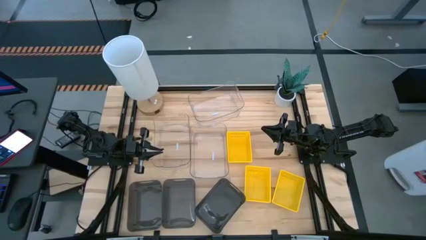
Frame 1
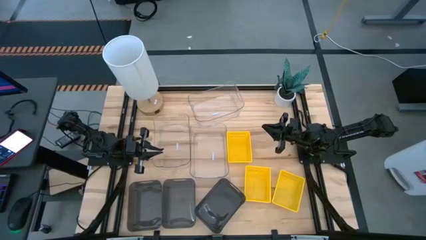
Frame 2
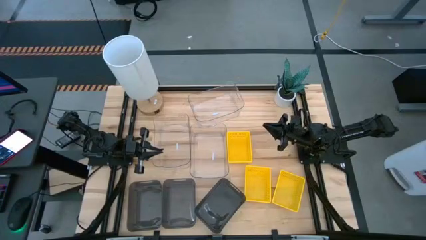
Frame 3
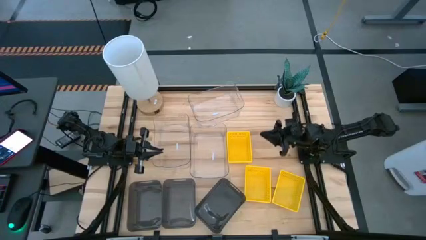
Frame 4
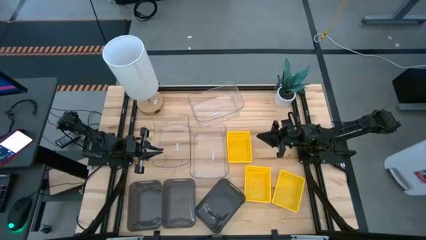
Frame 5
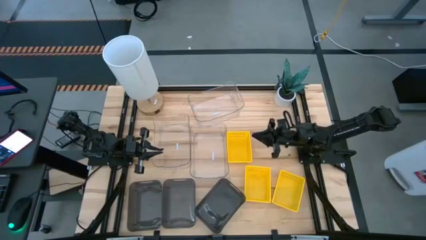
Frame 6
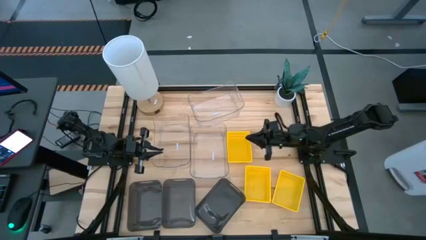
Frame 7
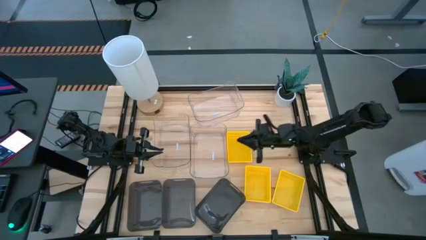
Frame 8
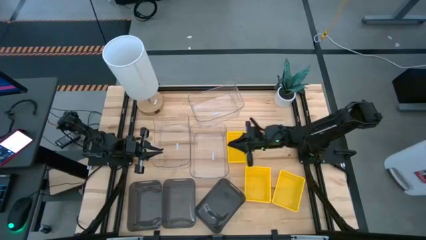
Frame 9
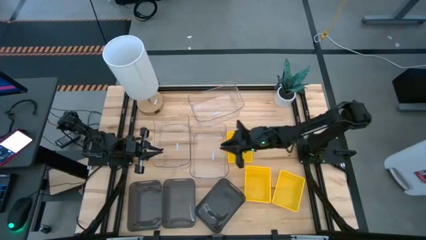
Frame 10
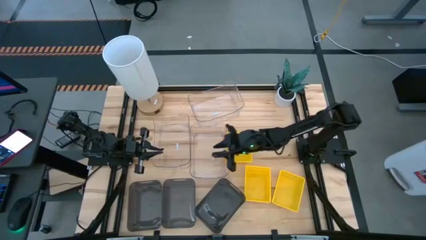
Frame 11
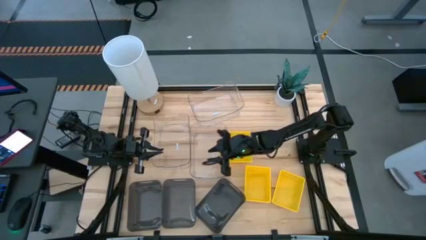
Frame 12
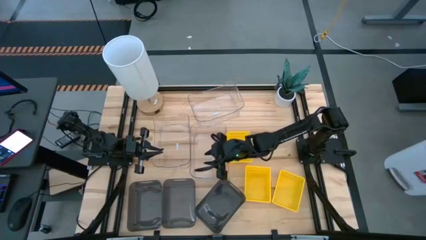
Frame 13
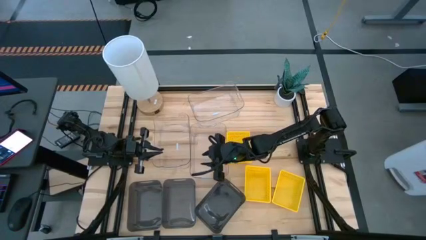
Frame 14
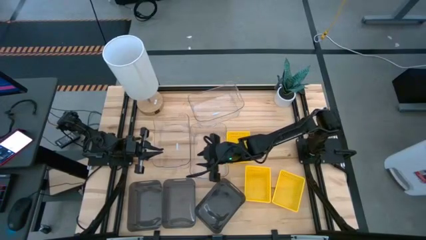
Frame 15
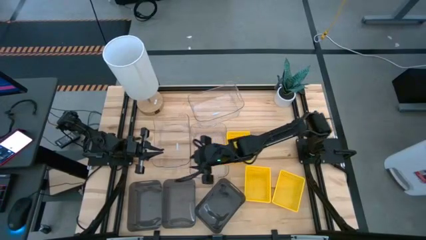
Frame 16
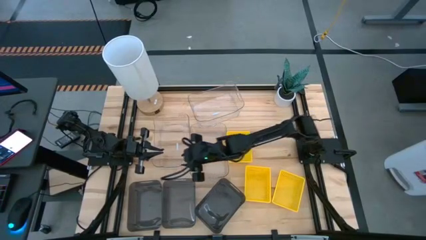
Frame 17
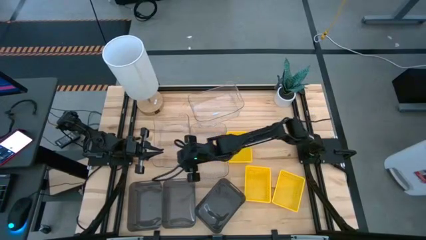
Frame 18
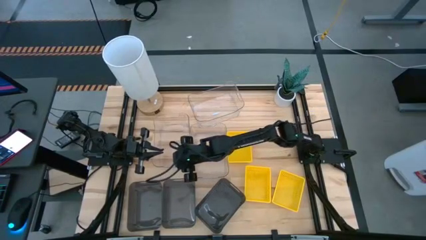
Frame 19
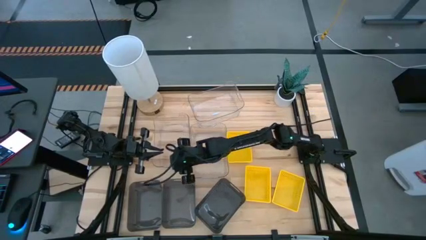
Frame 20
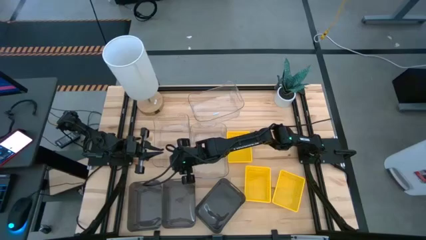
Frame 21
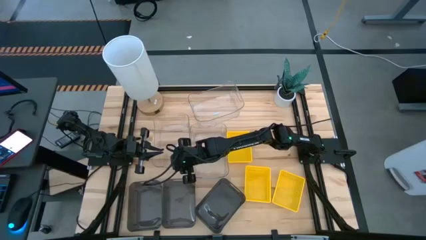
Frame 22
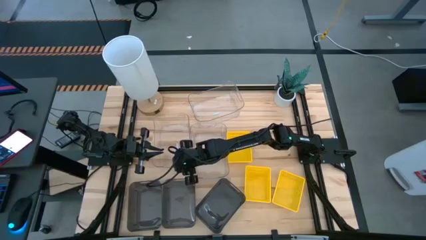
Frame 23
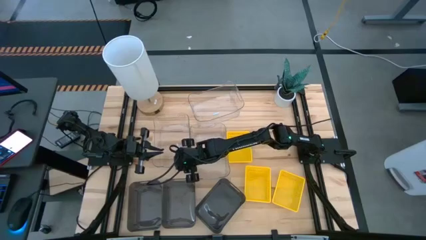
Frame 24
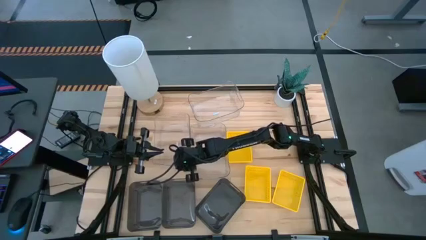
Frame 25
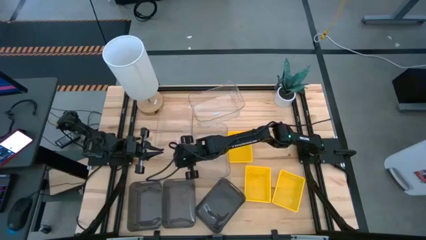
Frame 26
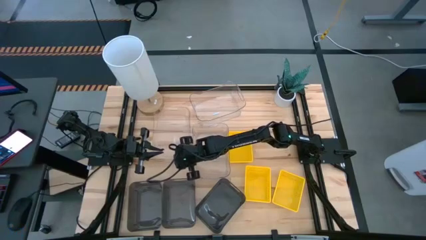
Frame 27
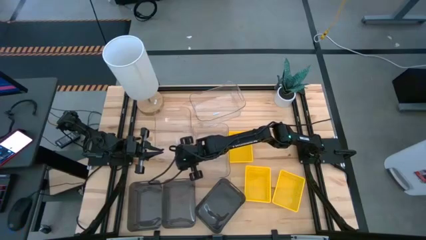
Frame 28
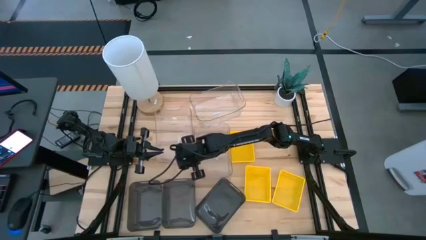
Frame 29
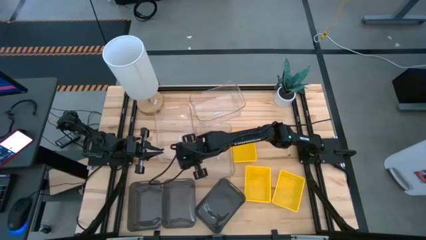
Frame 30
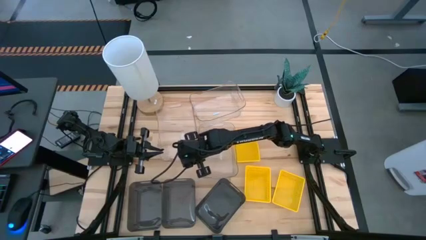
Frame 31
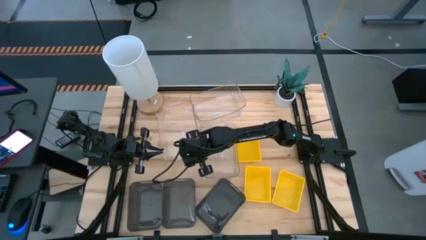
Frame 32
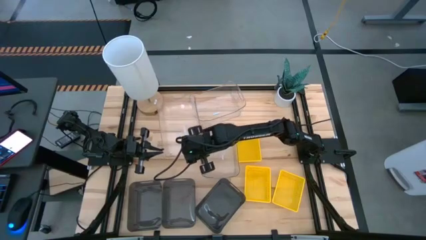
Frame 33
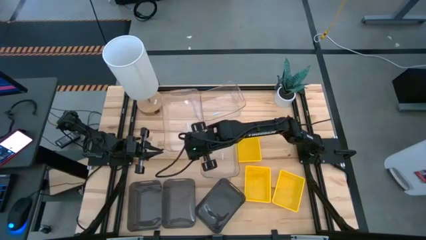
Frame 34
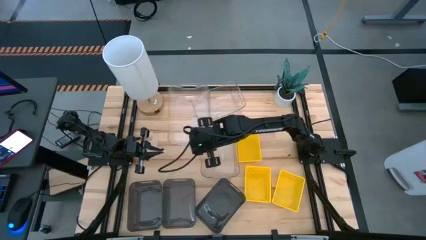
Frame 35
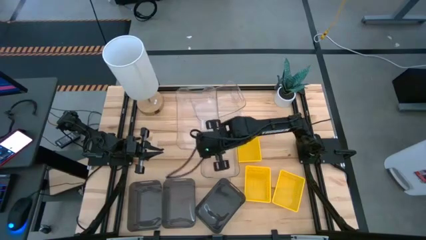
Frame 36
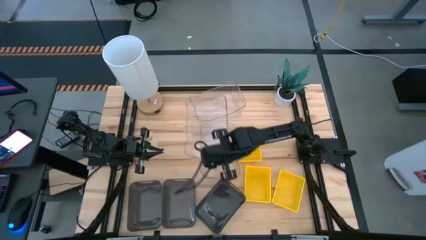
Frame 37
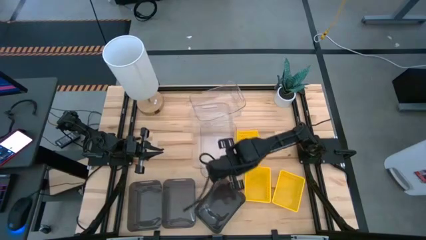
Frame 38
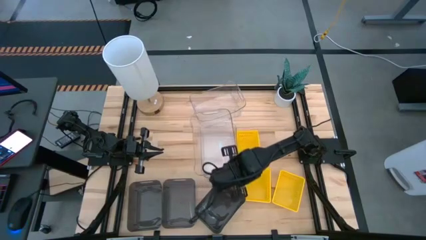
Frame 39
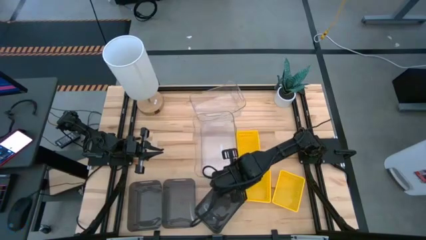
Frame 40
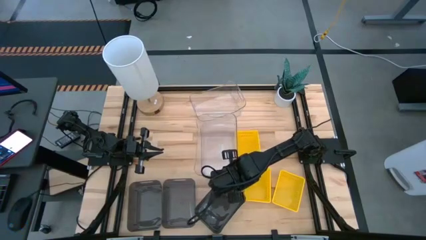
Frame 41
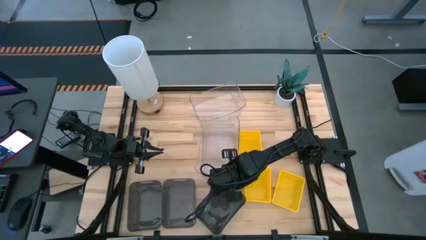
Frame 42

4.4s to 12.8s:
Stack the left transparent bin on the top of the right transparent bin

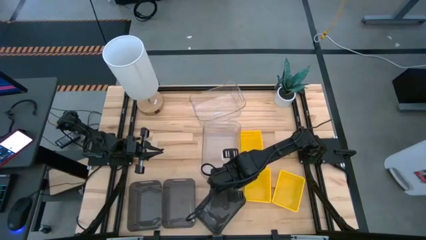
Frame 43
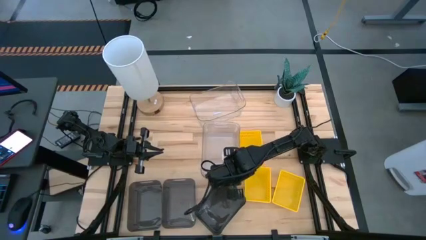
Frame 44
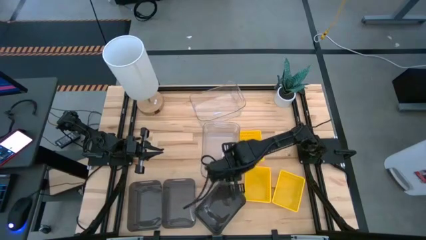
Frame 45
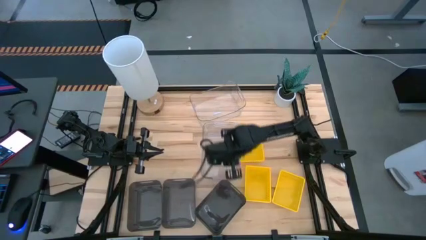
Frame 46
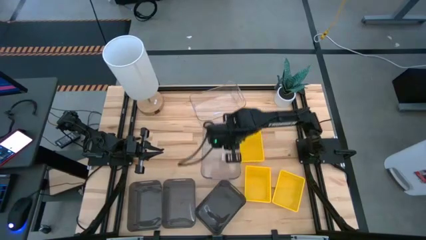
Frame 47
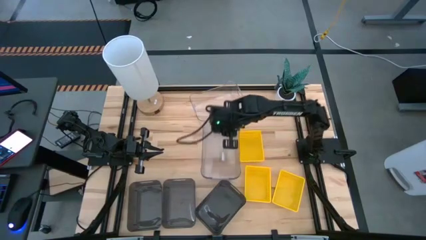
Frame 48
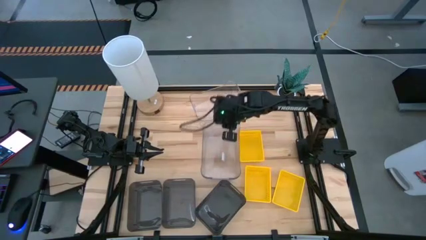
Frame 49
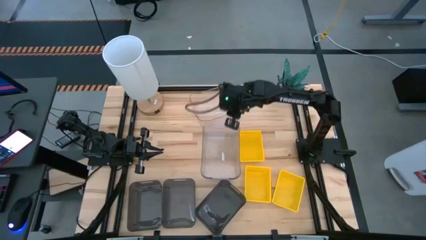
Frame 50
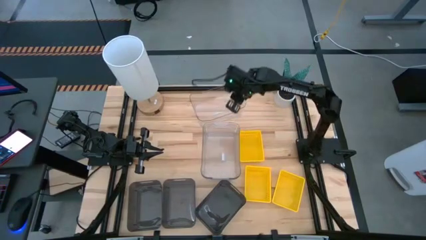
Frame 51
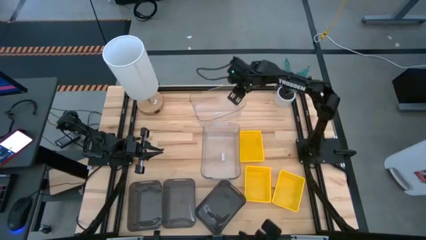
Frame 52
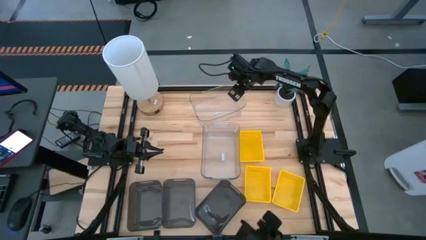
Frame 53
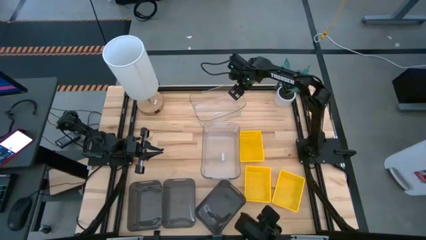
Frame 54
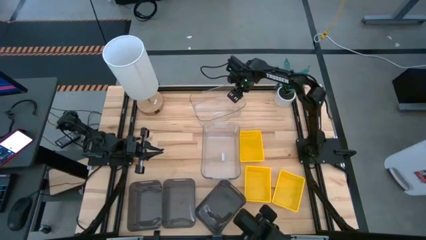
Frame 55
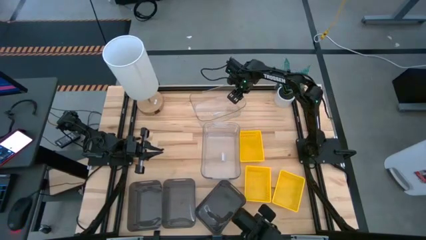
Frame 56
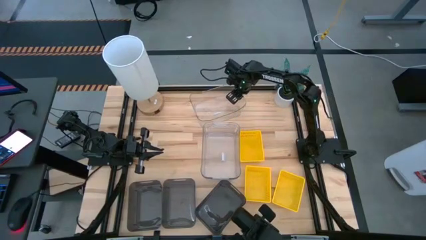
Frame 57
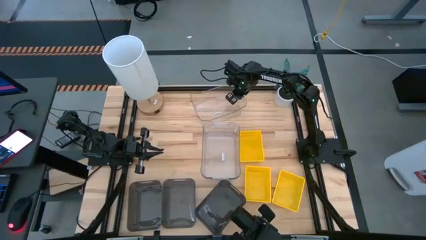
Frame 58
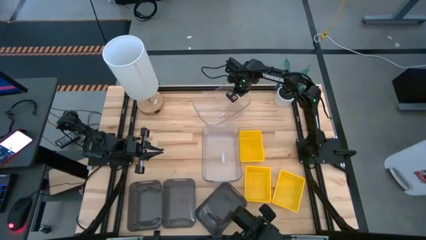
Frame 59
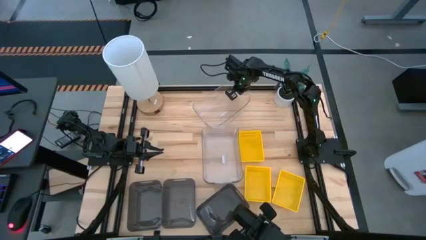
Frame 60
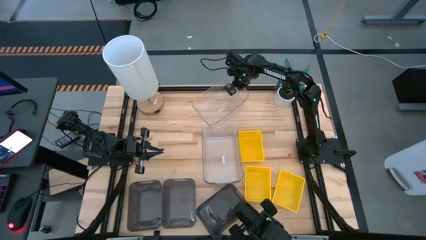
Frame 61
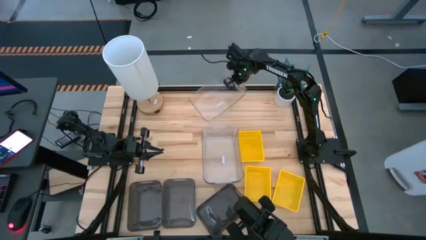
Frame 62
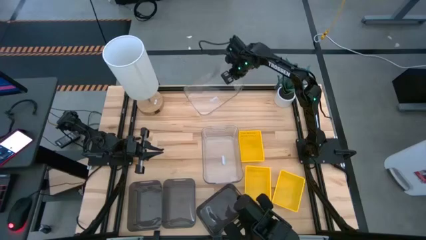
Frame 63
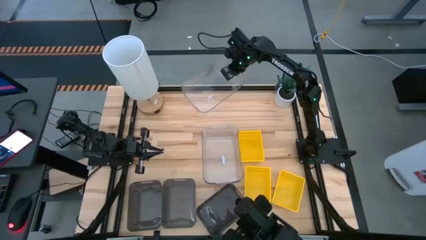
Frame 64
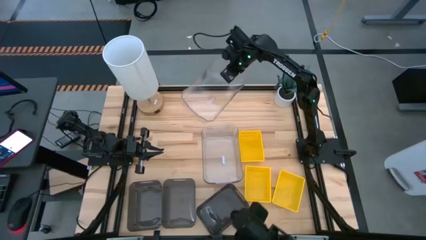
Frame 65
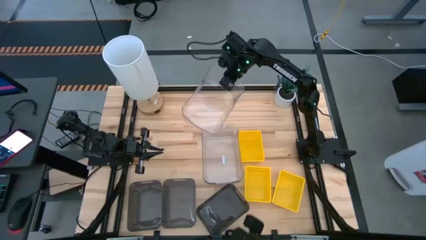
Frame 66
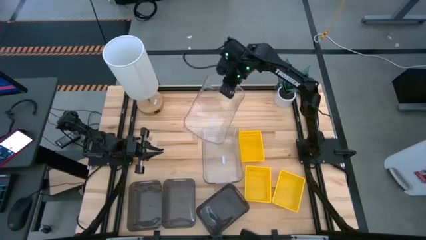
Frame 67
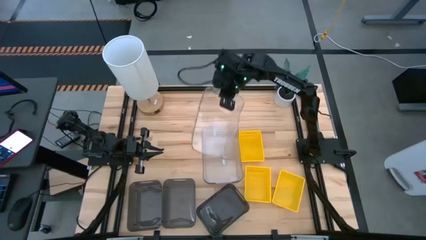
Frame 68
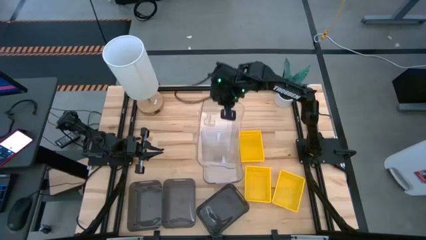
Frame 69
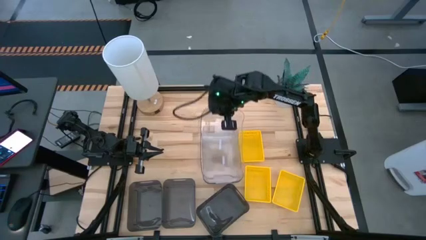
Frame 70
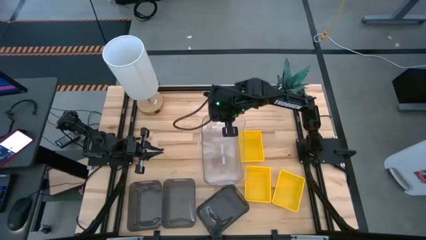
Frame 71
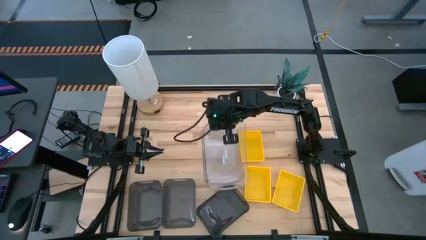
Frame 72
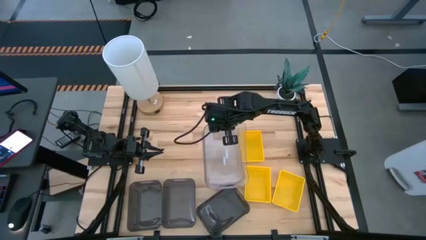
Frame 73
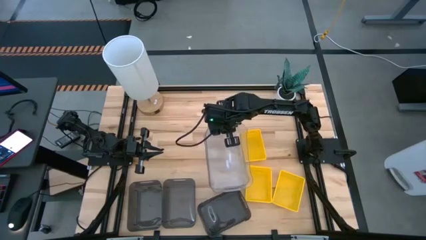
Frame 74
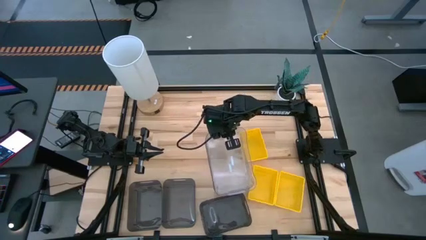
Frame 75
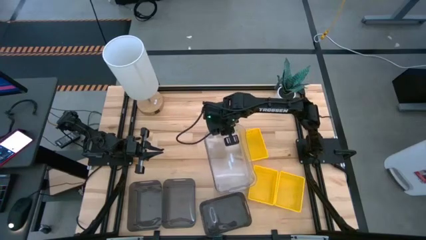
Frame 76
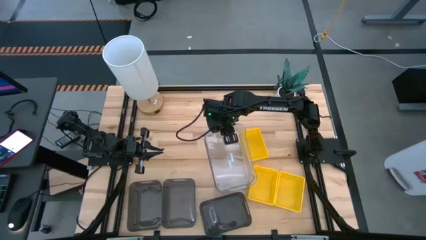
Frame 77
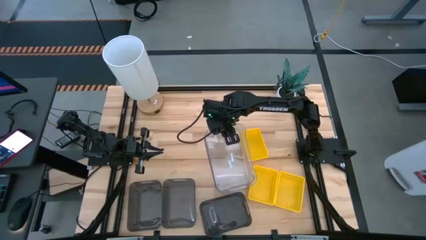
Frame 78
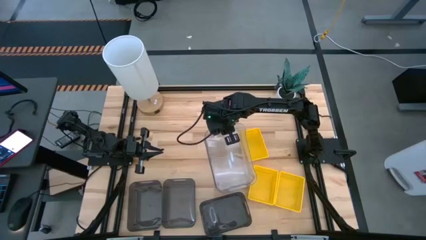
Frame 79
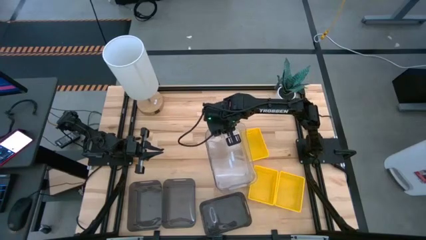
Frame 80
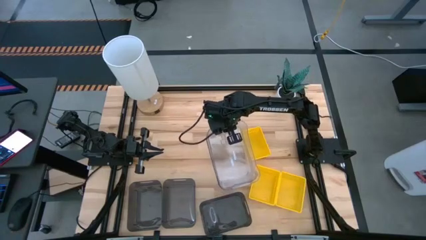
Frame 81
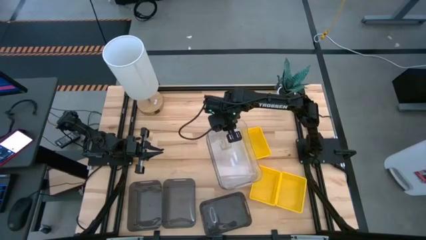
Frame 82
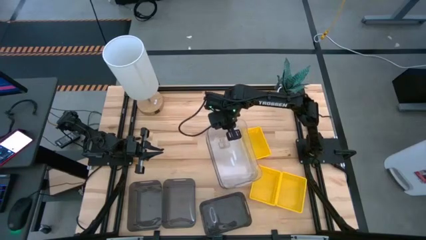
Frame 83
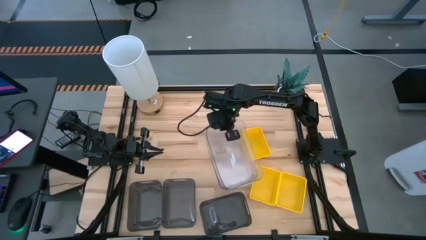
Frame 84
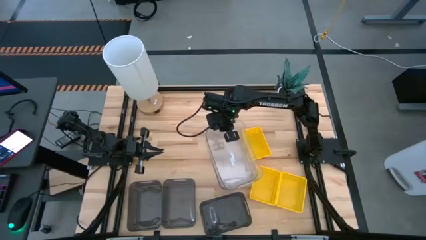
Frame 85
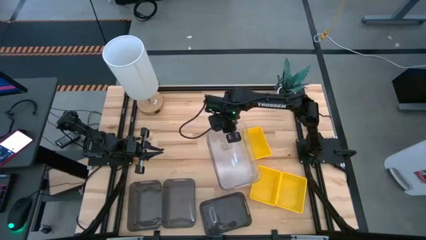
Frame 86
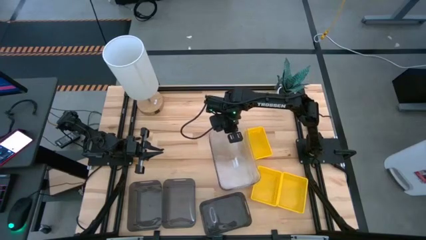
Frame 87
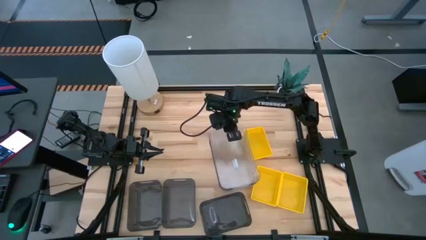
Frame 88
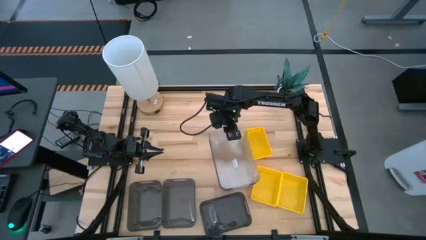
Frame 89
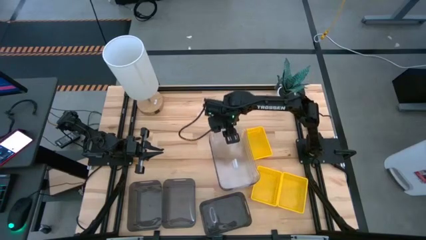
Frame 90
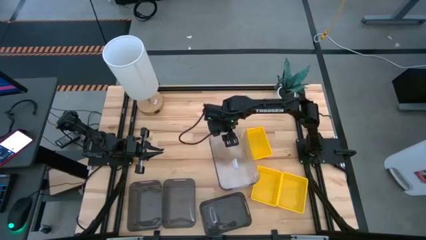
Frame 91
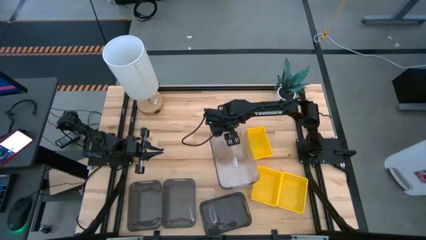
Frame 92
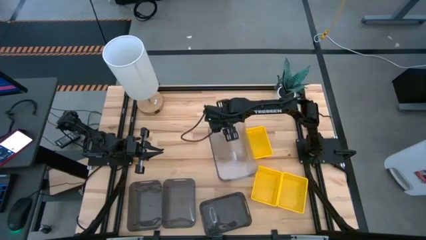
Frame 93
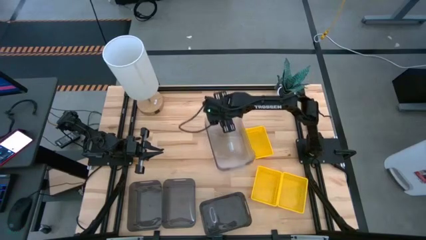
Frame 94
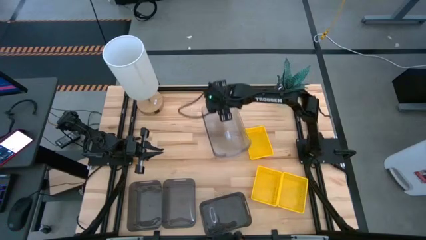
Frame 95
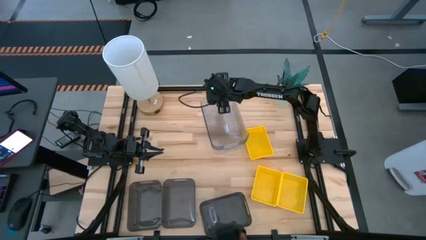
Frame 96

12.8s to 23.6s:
Stack the transparent bin on the top of the stacked transparent bins
